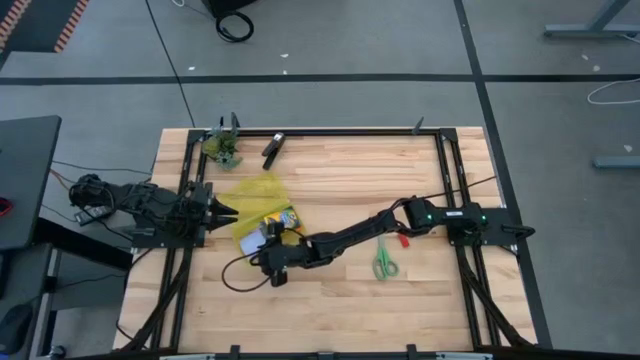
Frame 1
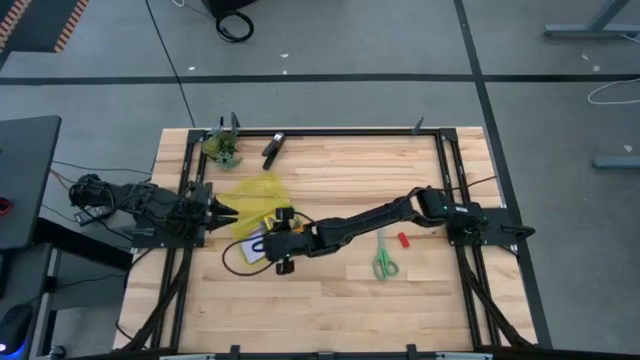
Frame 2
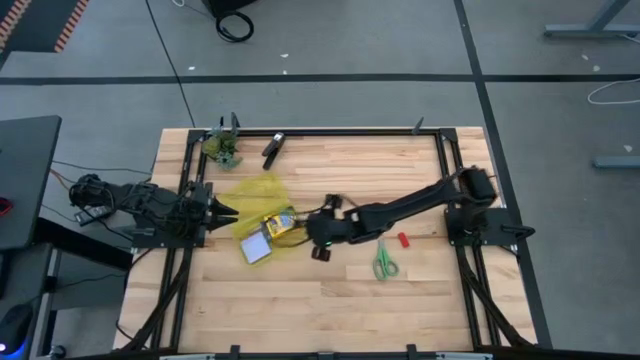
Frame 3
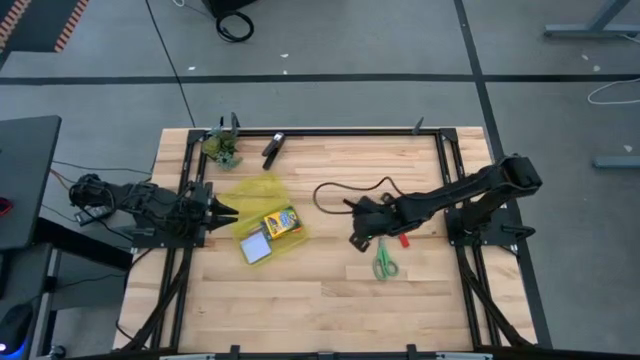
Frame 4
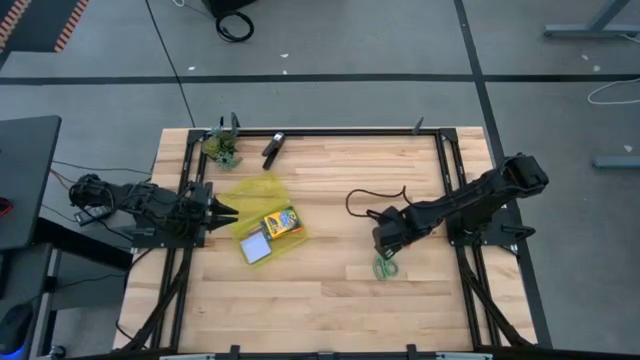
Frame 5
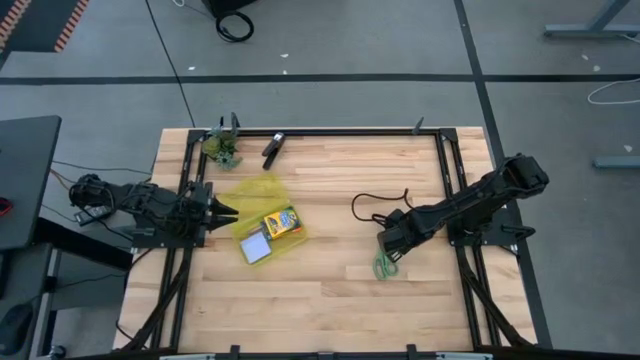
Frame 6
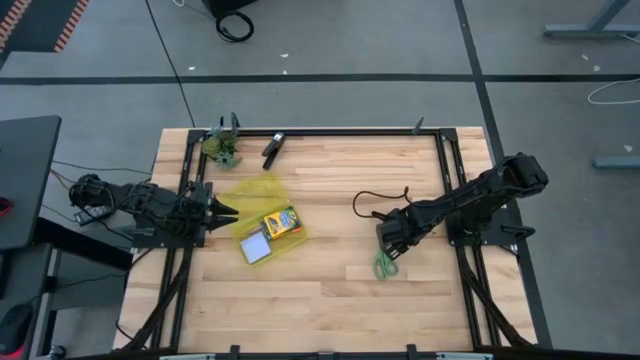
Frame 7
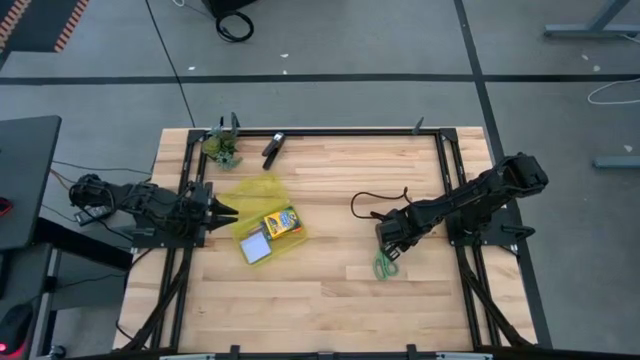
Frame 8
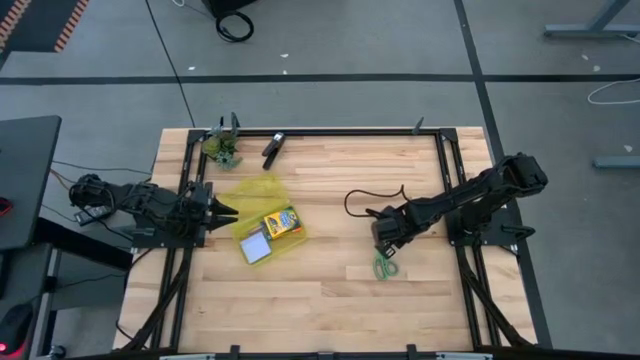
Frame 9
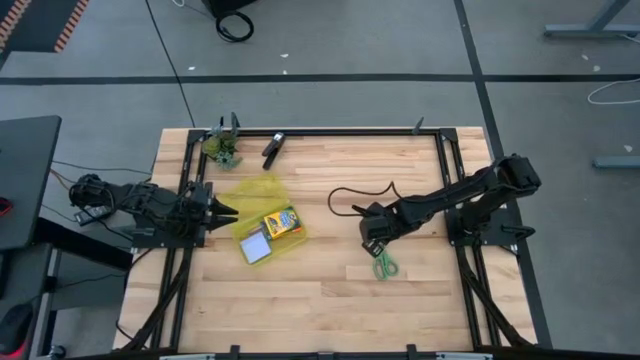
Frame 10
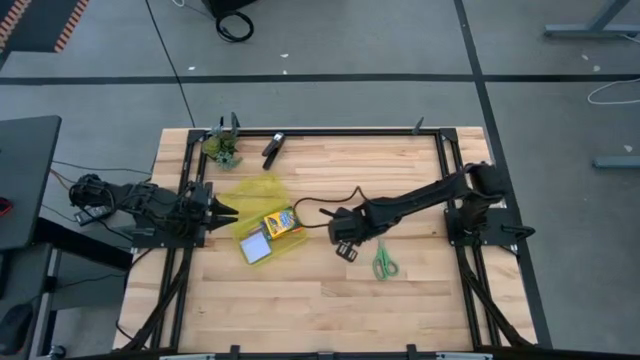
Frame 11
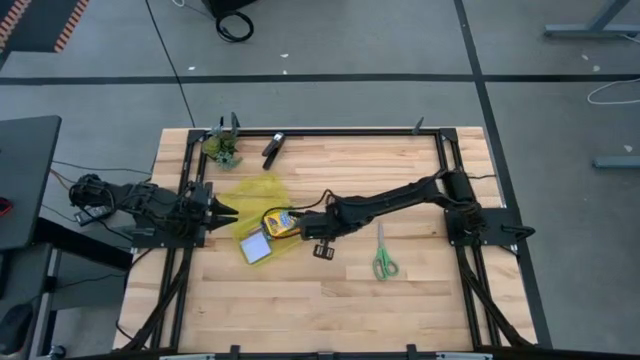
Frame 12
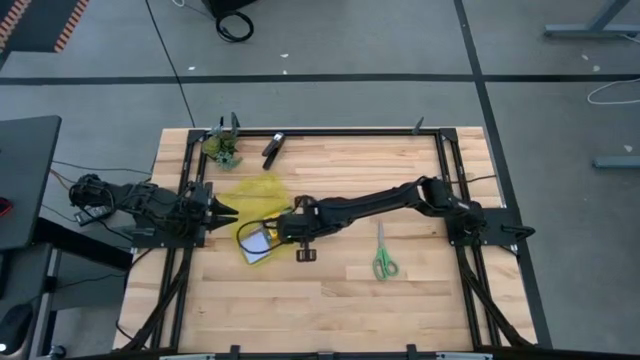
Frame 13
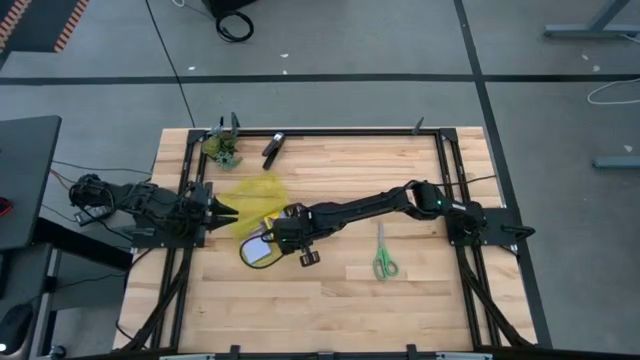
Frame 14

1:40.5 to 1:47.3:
Task: Pack school essentials
Put the red eraser into the yellow supply box

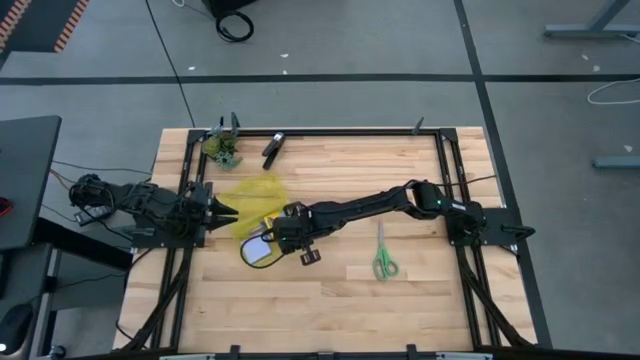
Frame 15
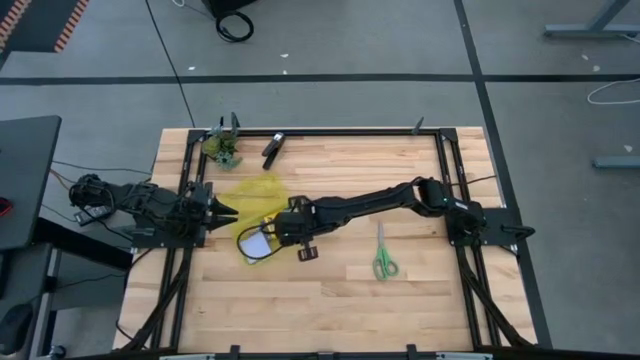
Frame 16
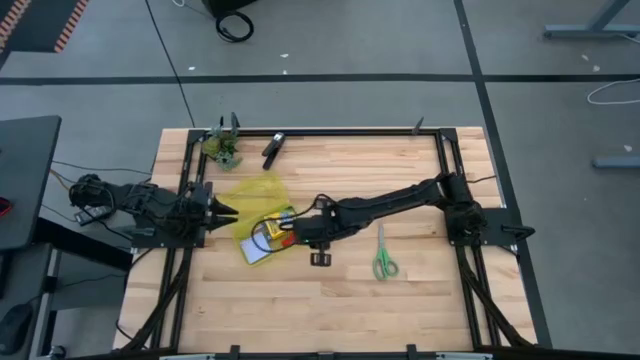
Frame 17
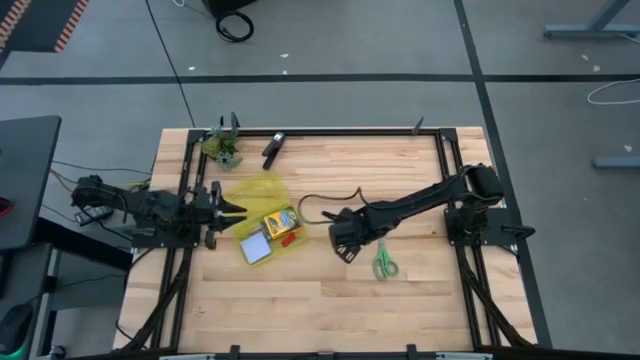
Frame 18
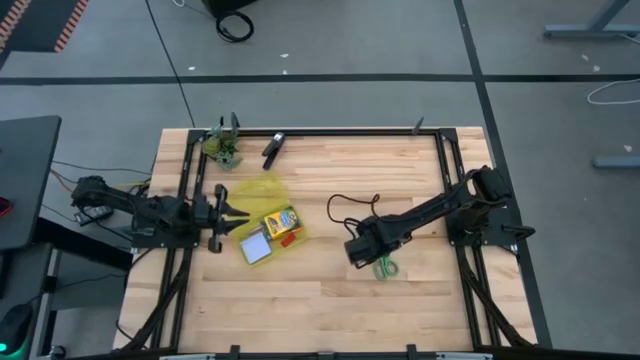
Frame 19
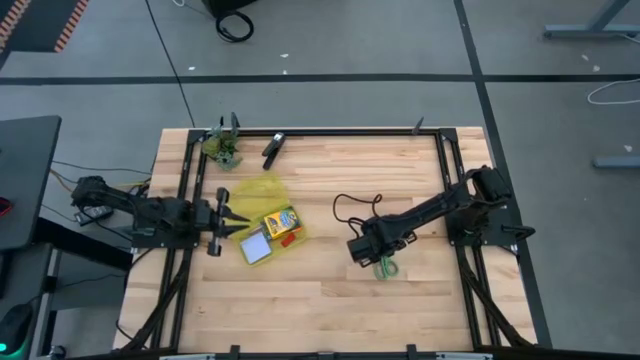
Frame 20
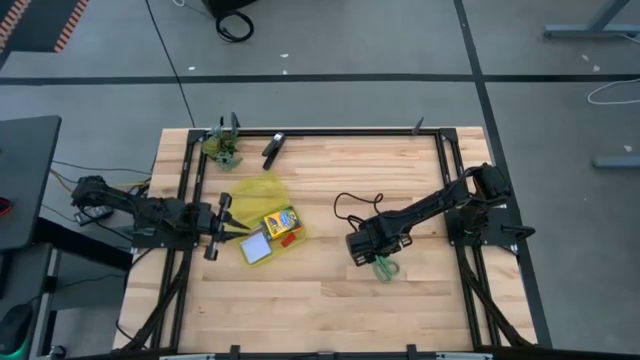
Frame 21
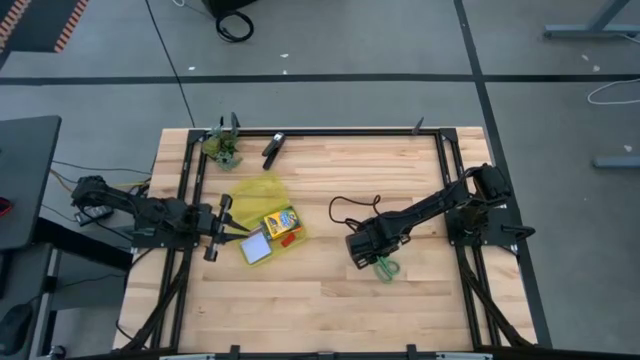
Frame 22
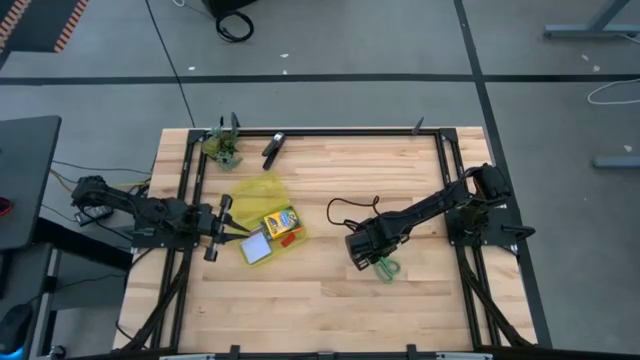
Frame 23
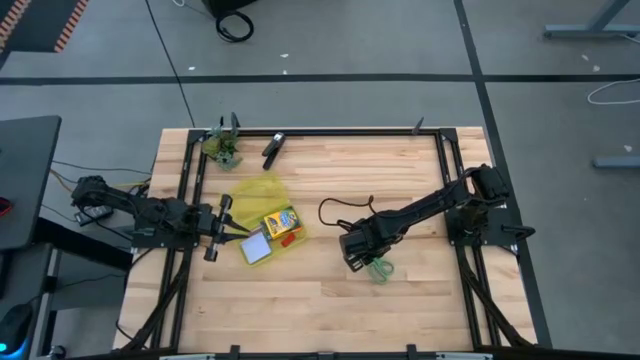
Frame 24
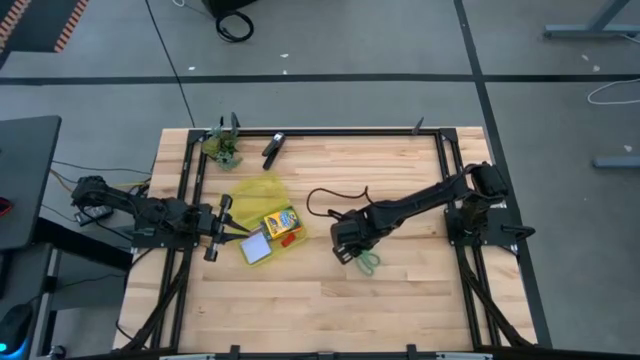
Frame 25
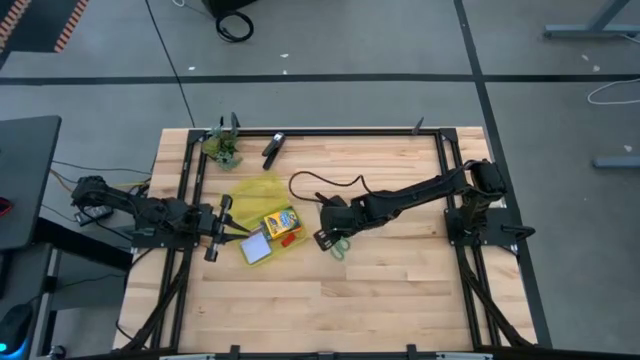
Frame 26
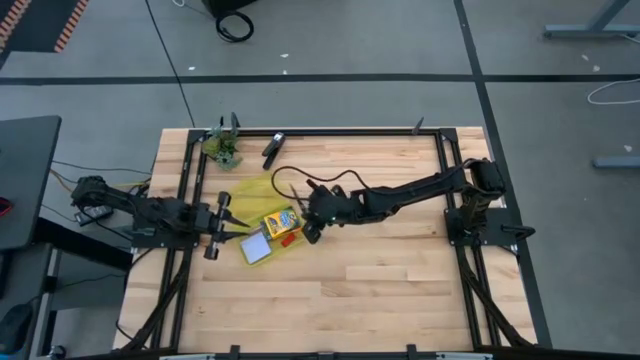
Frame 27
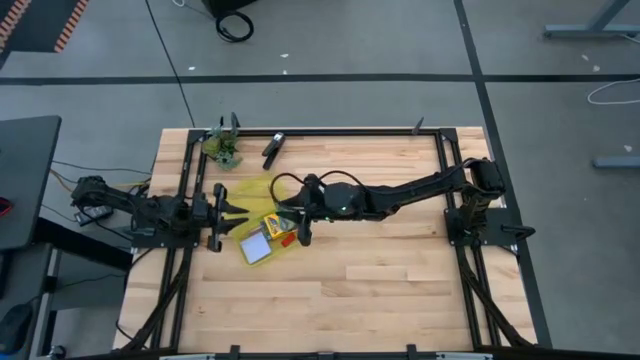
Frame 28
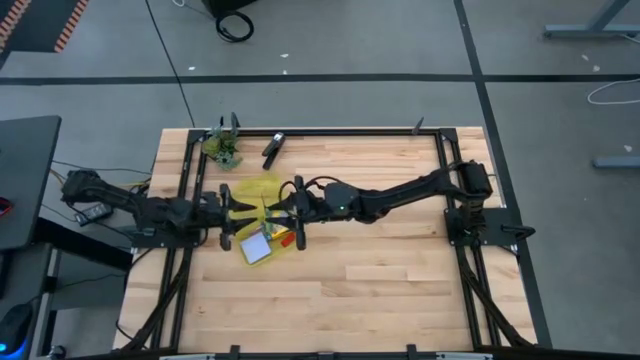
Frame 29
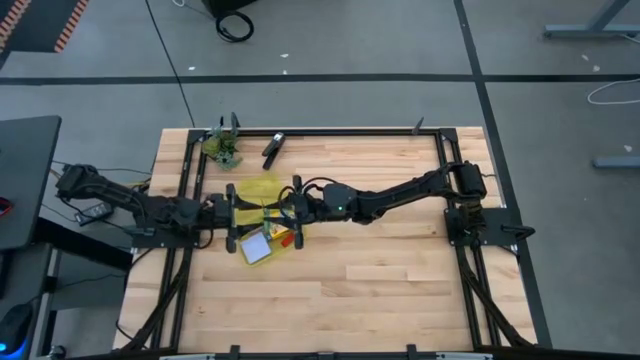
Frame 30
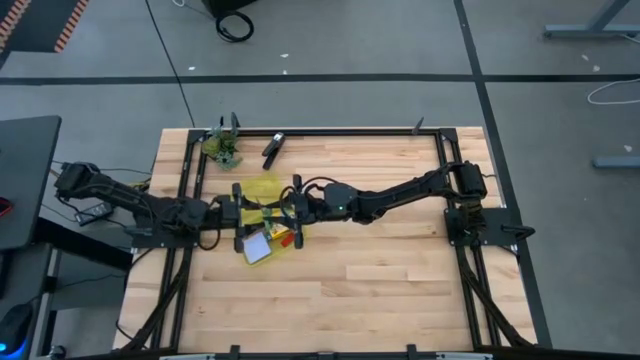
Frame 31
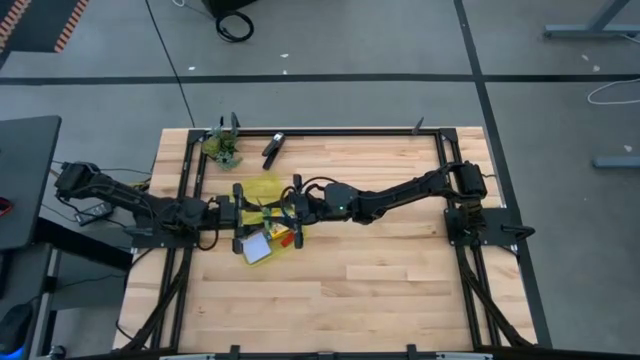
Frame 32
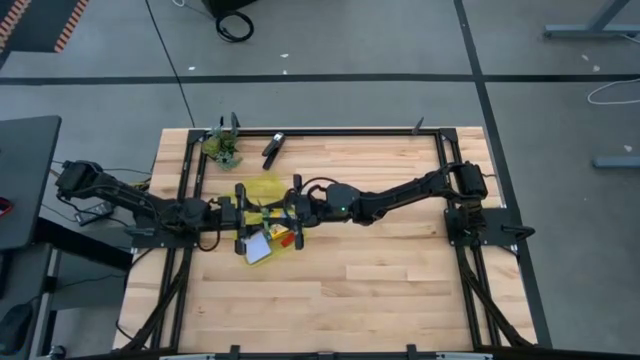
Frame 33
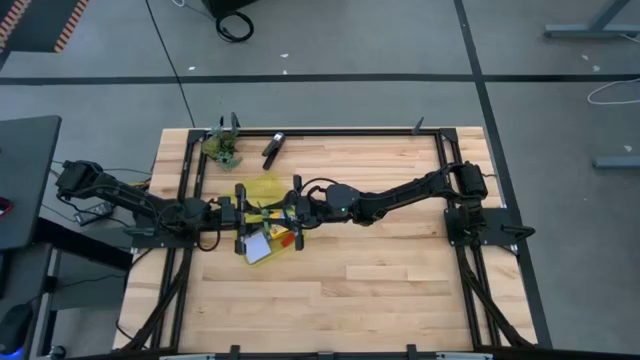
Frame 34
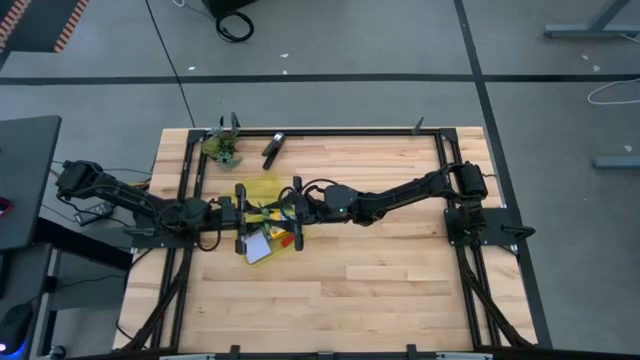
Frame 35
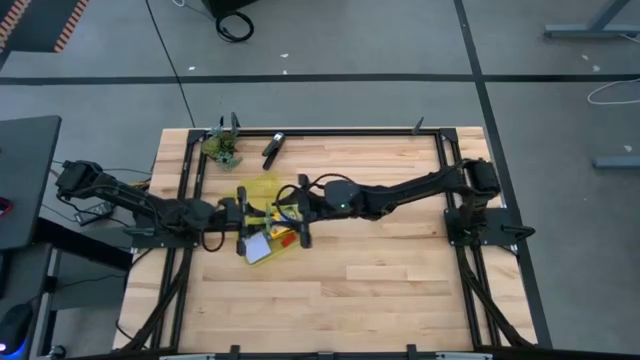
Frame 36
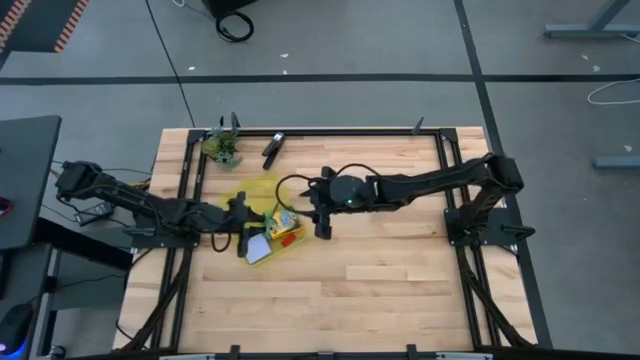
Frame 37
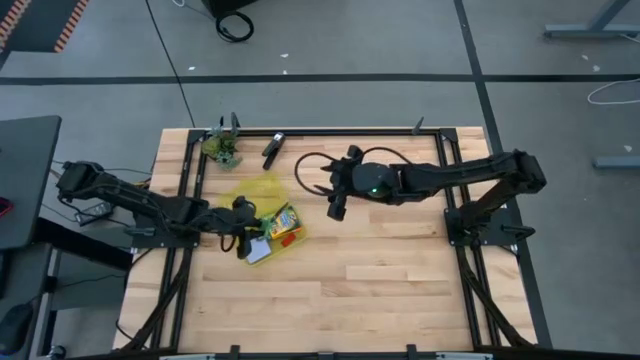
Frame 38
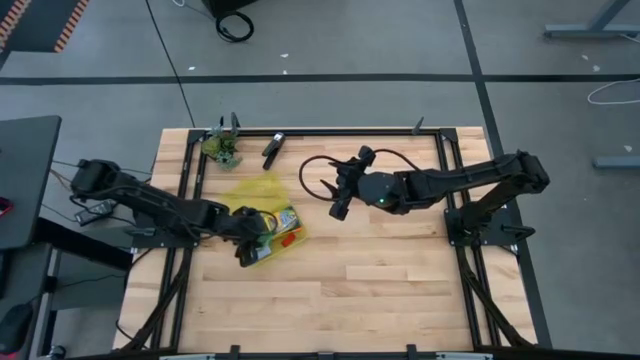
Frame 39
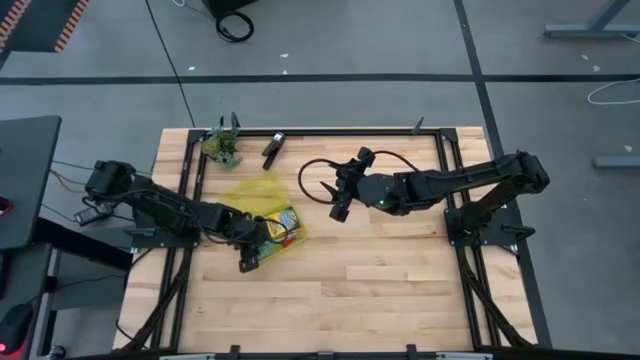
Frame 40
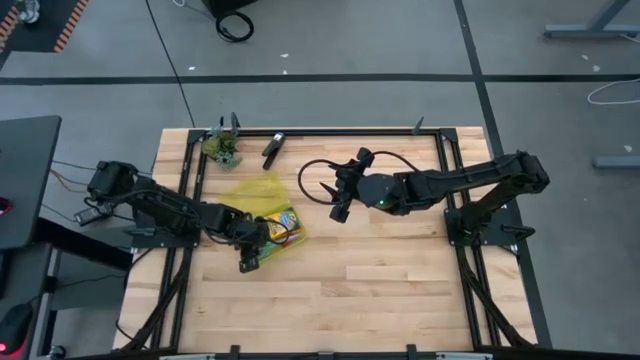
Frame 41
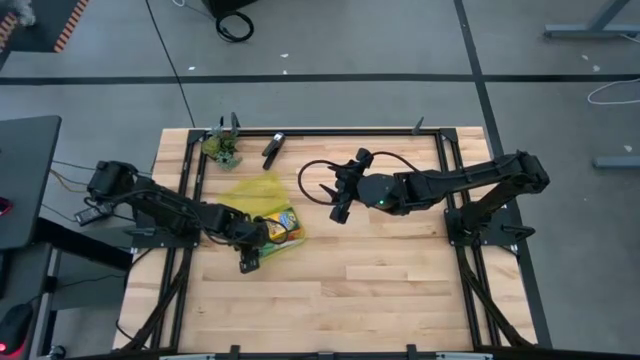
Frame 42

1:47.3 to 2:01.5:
Put the green scissors into the yellow supply box
